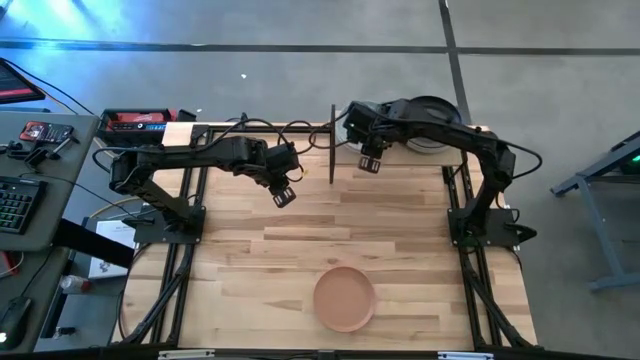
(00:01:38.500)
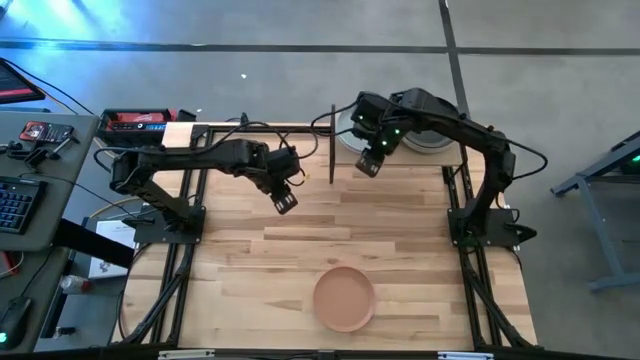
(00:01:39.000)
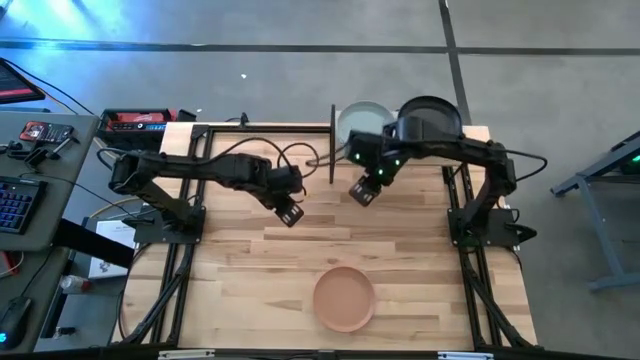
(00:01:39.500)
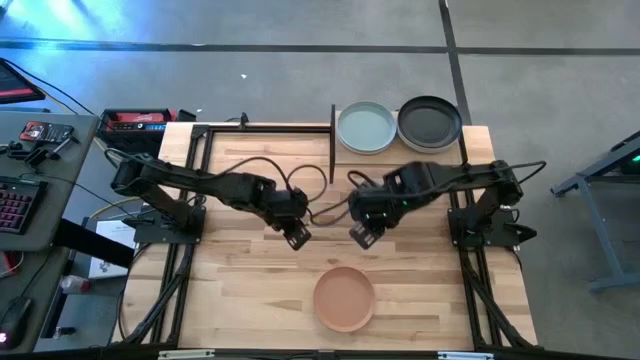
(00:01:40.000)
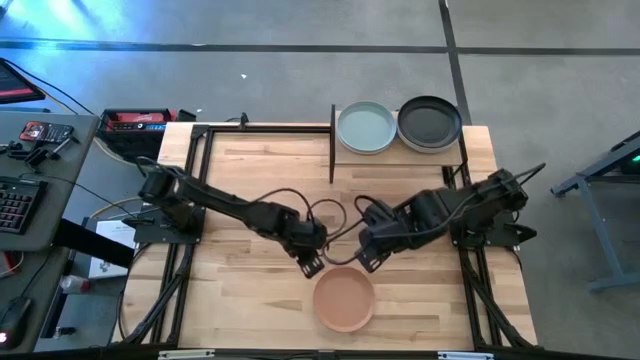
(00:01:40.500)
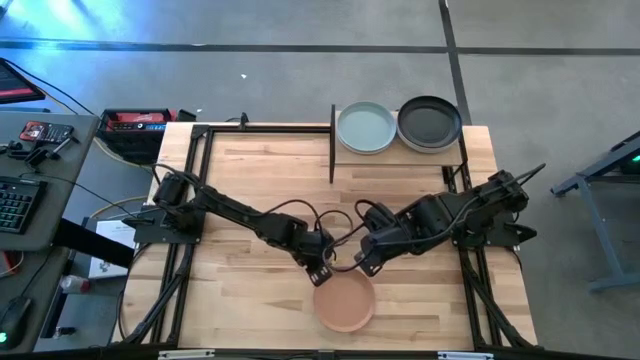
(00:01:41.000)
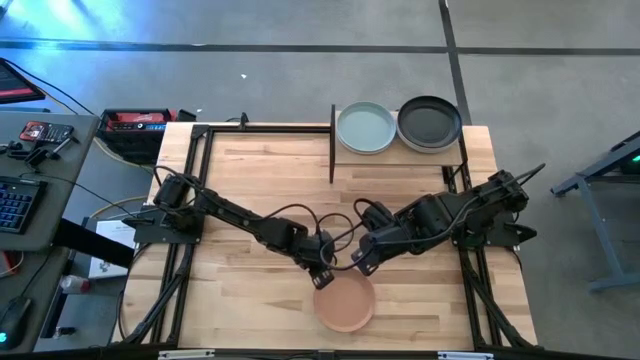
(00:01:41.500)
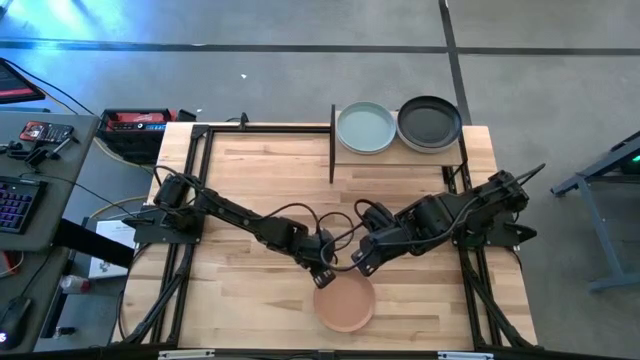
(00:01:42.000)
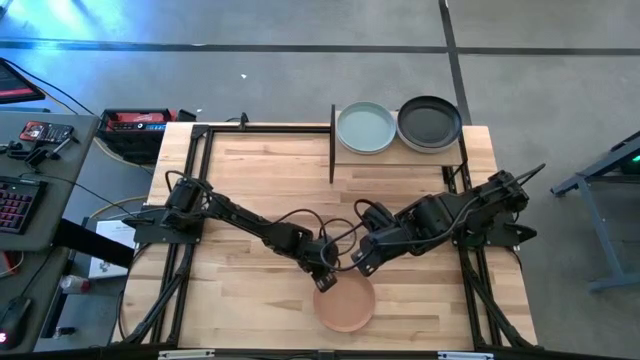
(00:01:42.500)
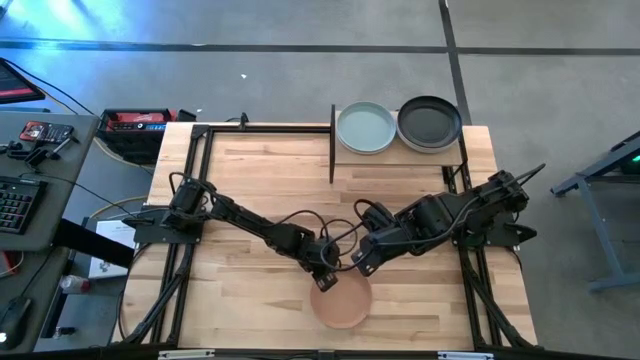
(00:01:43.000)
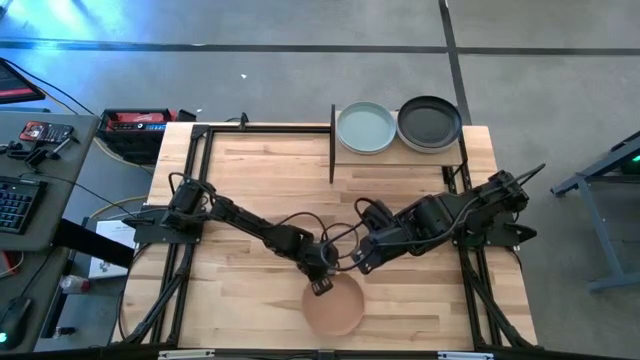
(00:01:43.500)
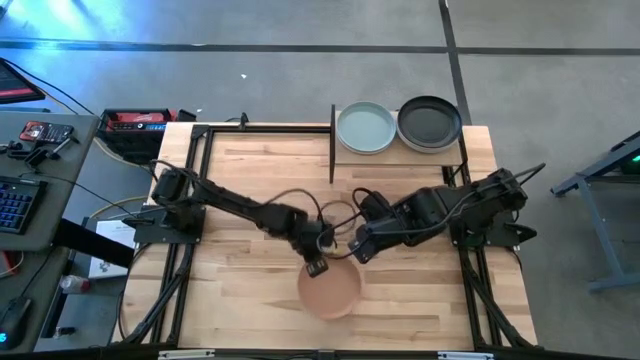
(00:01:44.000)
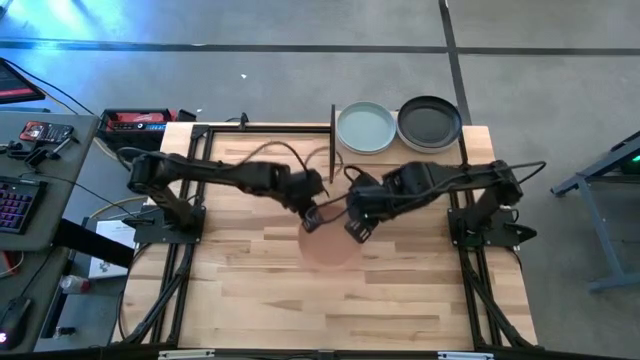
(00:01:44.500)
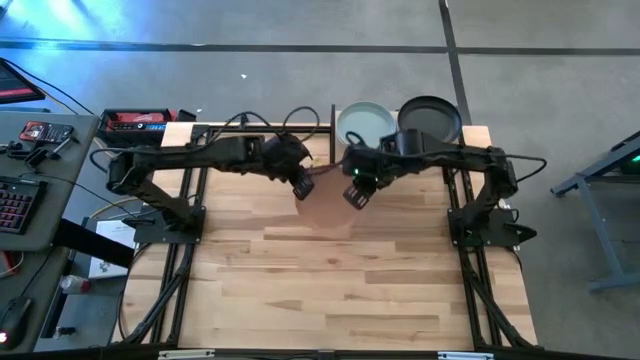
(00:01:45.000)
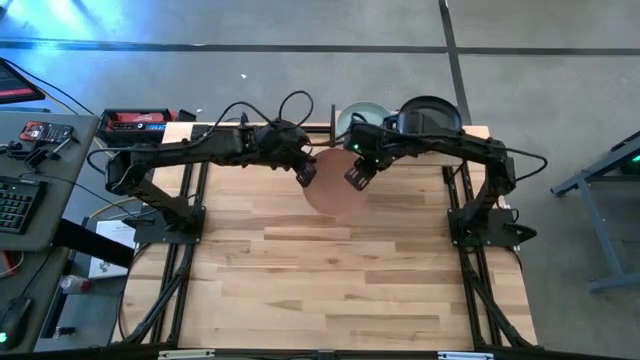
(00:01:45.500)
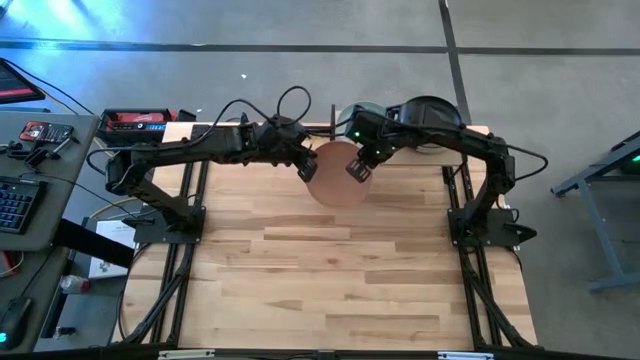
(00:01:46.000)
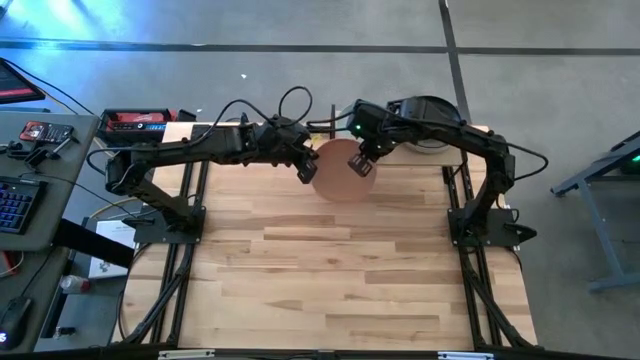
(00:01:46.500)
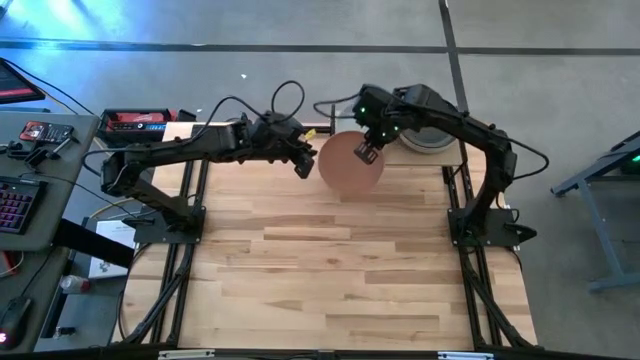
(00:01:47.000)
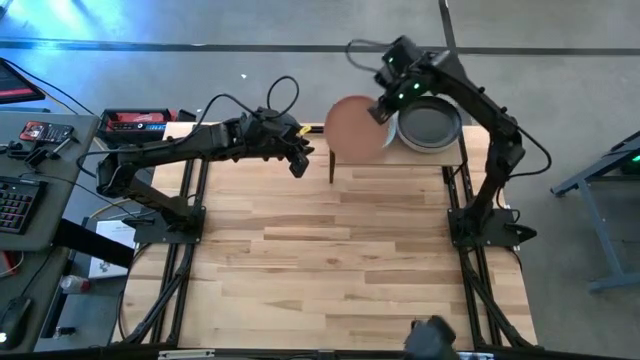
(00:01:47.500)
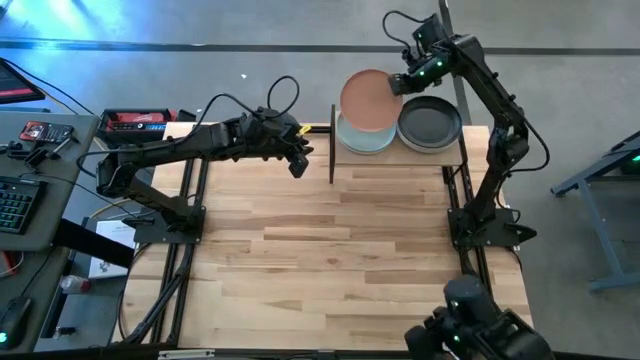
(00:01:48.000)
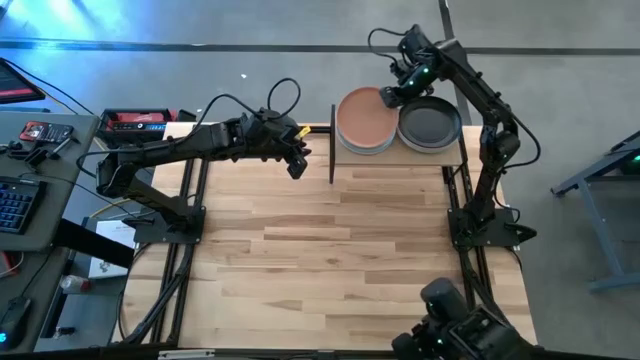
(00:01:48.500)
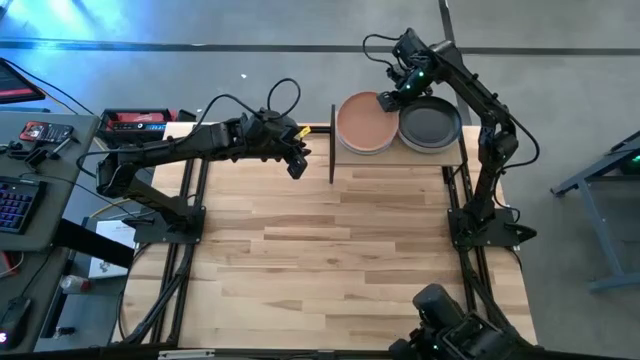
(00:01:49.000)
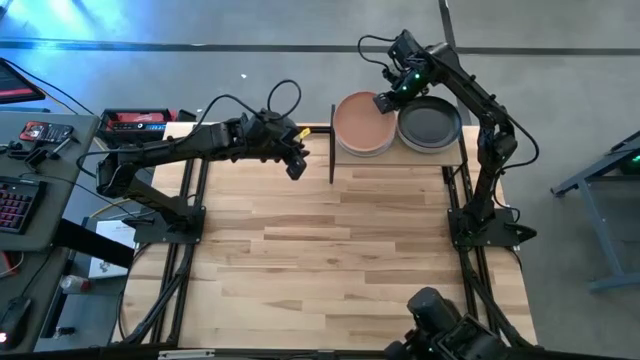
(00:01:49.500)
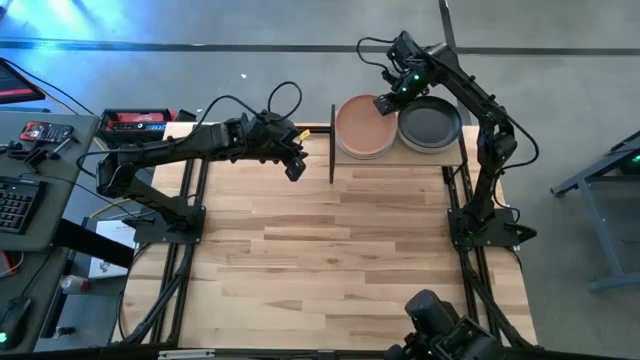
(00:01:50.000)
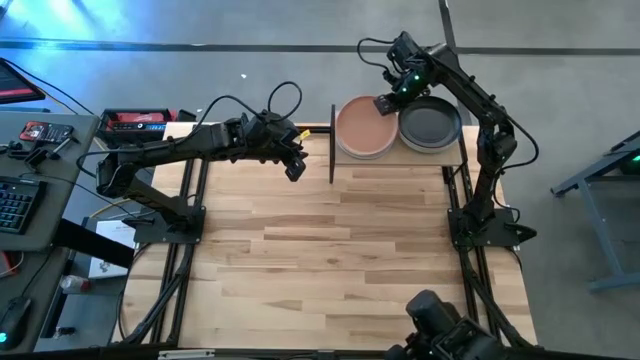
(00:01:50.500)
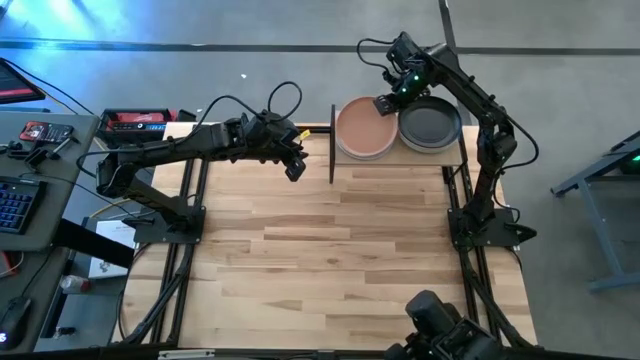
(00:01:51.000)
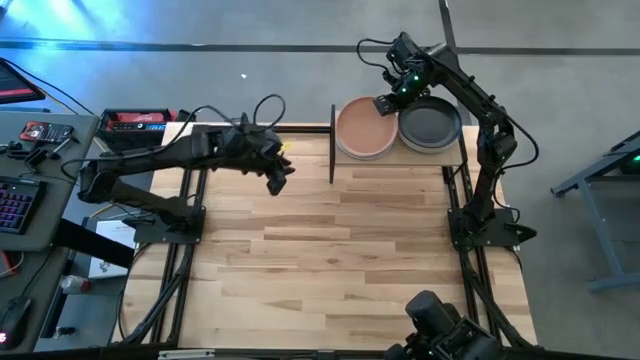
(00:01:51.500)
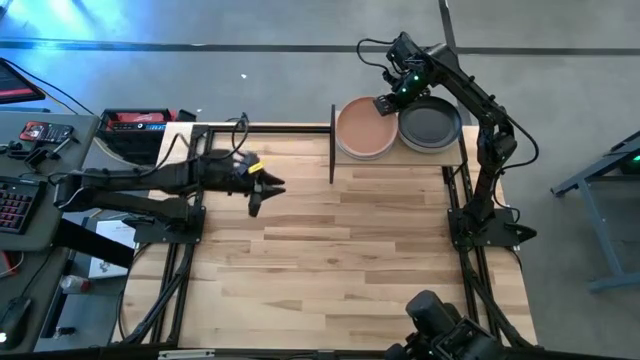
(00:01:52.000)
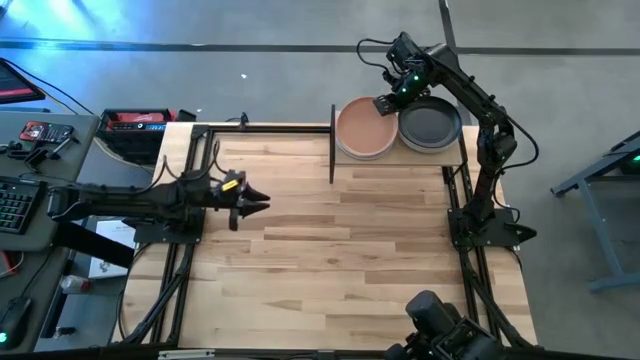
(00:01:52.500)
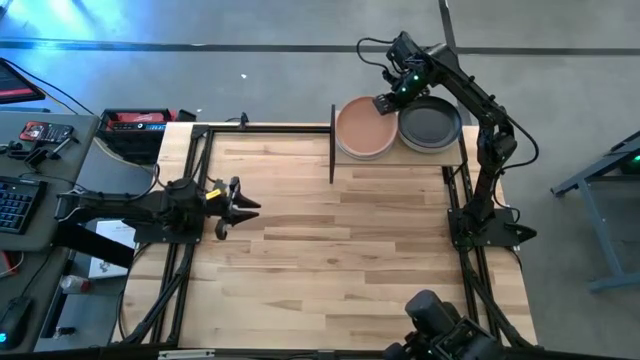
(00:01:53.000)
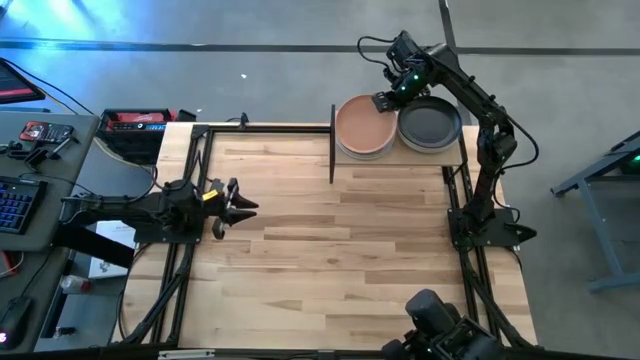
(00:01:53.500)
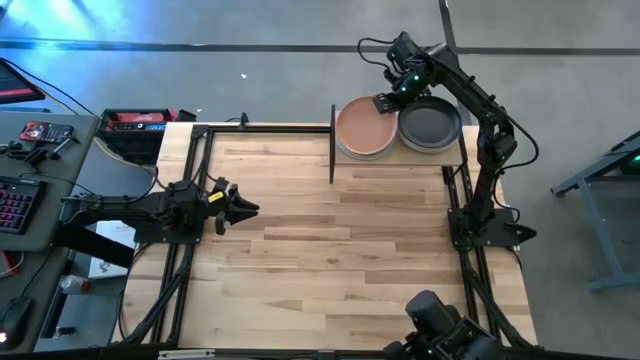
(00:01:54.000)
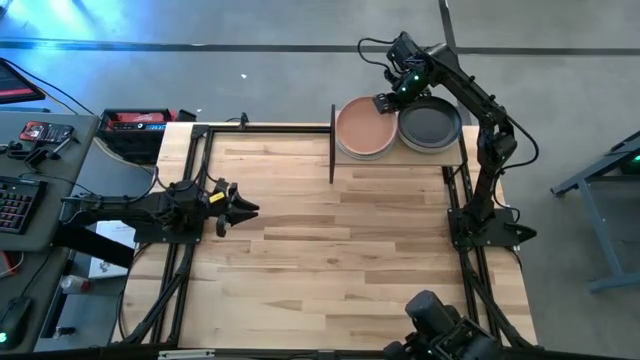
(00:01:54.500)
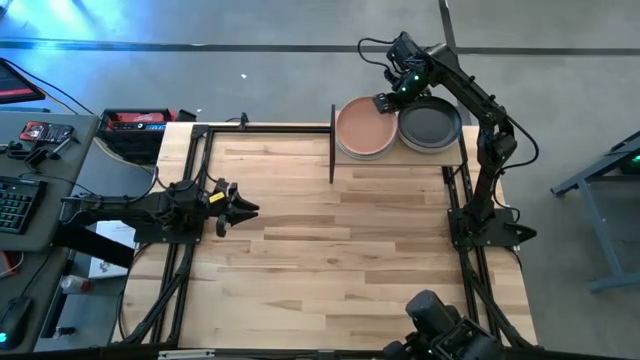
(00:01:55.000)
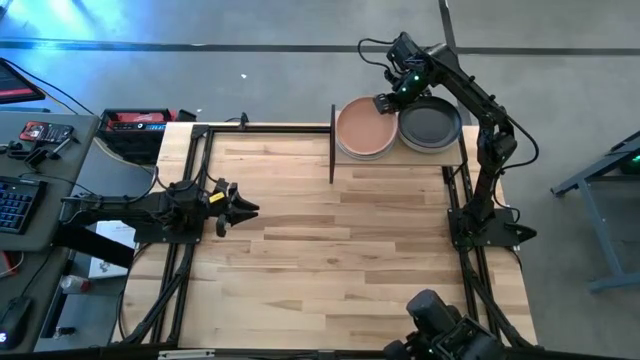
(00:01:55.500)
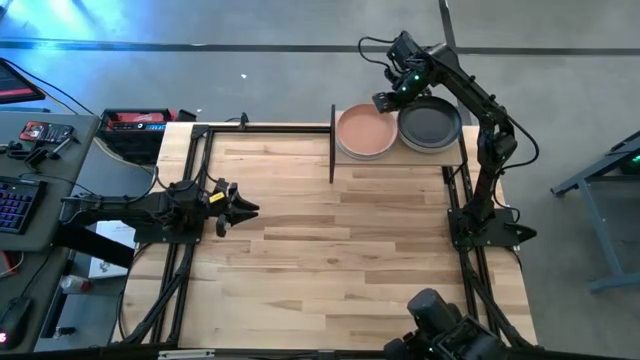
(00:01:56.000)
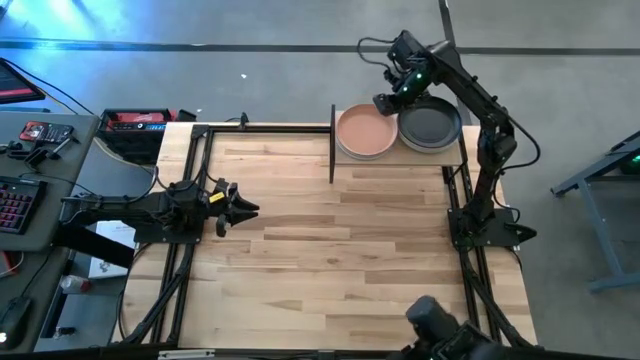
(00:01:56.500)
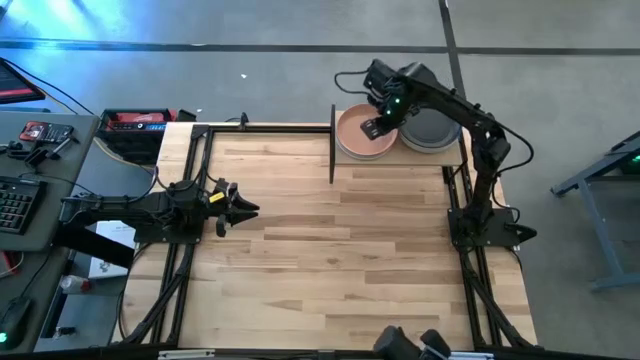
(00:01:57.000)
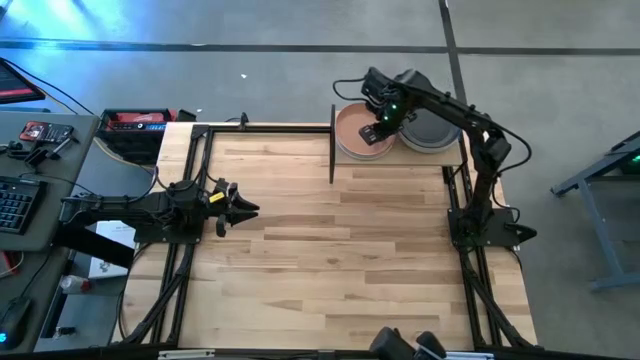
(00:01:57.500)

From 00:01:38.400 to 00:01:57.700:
Task: Place and stack plates onto a shelf
Stack the light orange plate on top of the blue plate on the shelf

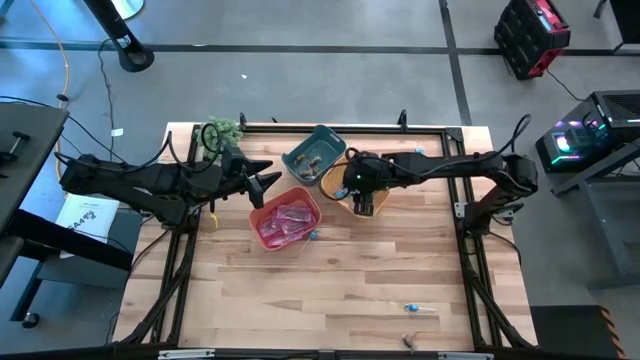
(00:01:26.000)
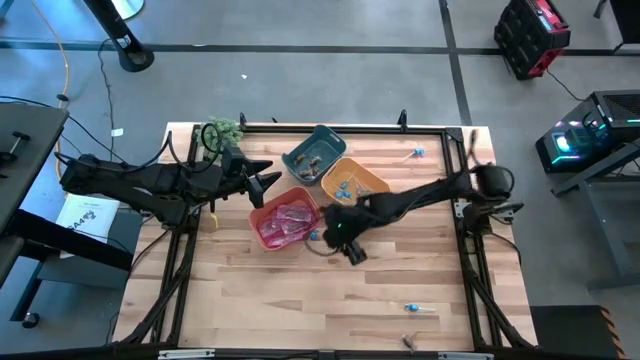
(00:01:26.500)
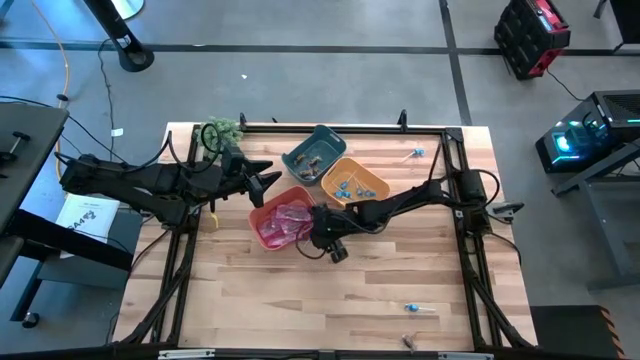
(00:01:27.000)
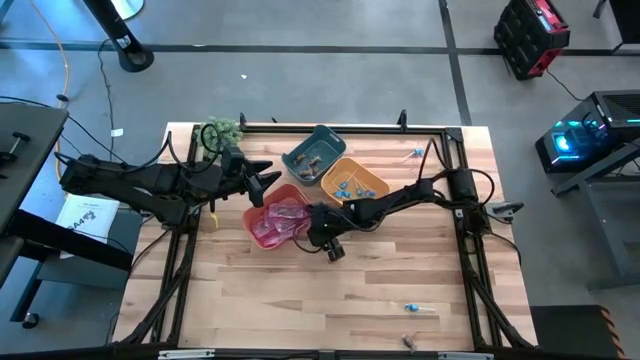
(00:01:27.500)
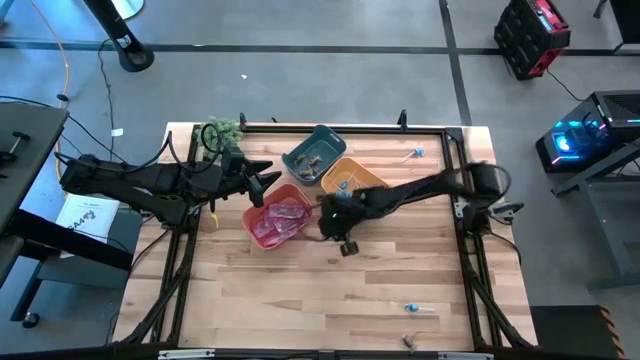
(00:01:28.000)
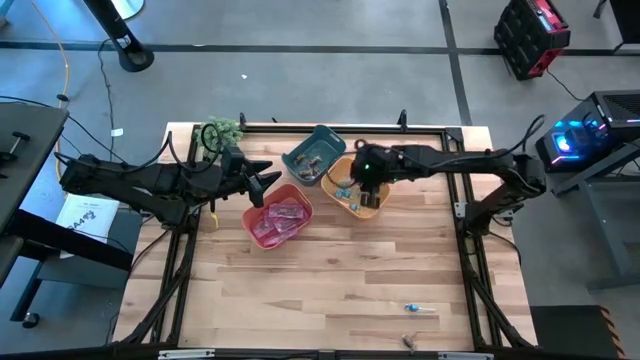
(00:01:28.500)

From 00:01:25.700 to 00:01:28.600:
Task: Sort candy
Put the blue candy into the yellow bin
